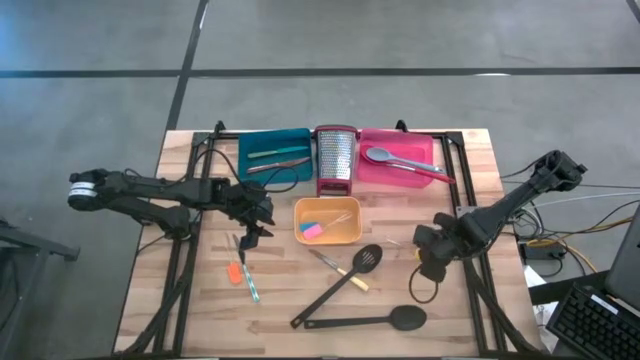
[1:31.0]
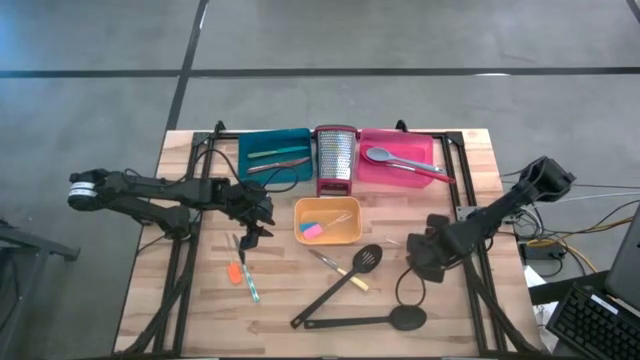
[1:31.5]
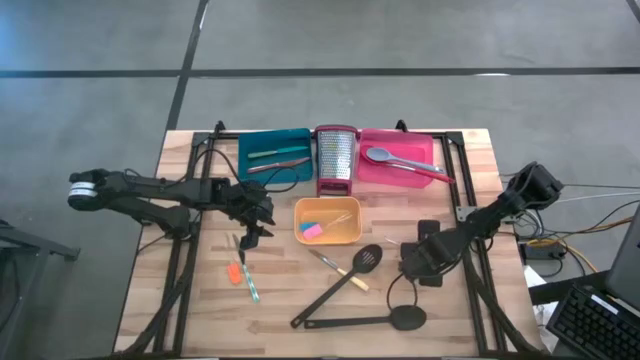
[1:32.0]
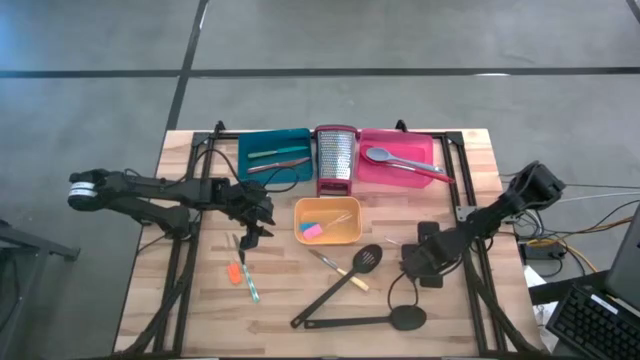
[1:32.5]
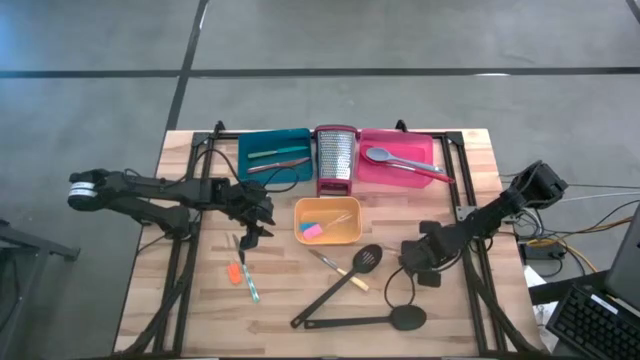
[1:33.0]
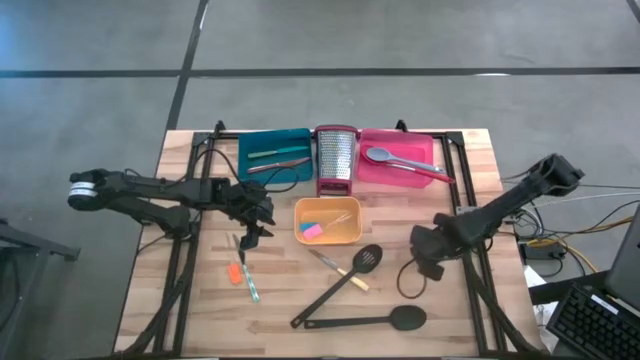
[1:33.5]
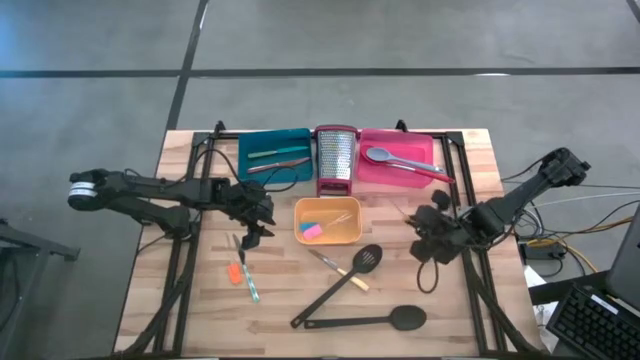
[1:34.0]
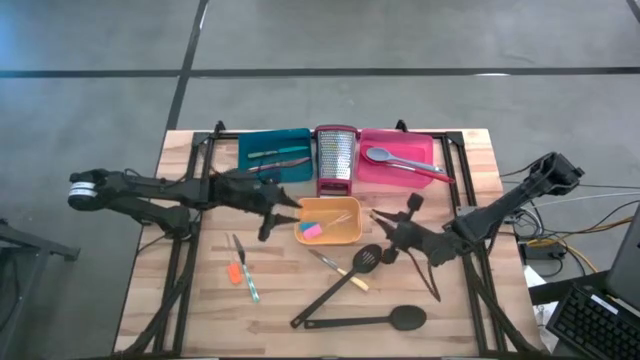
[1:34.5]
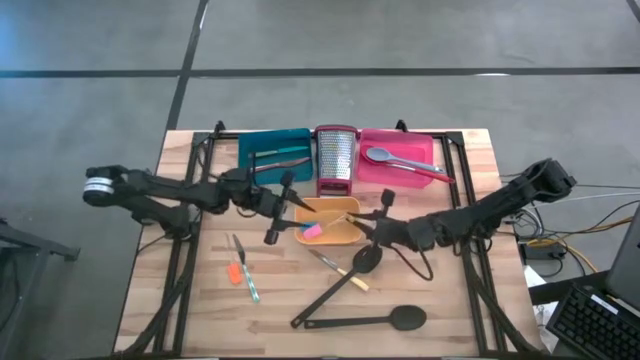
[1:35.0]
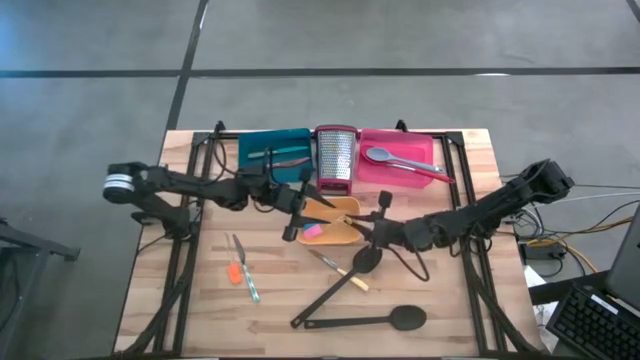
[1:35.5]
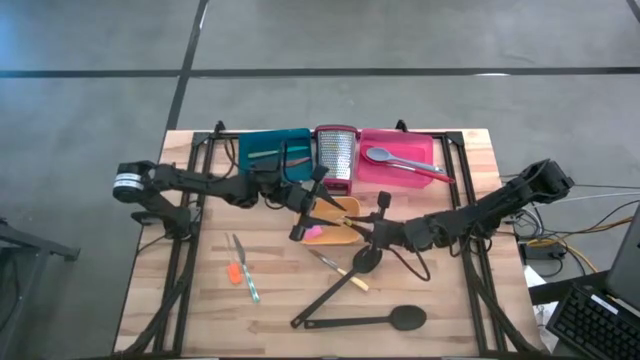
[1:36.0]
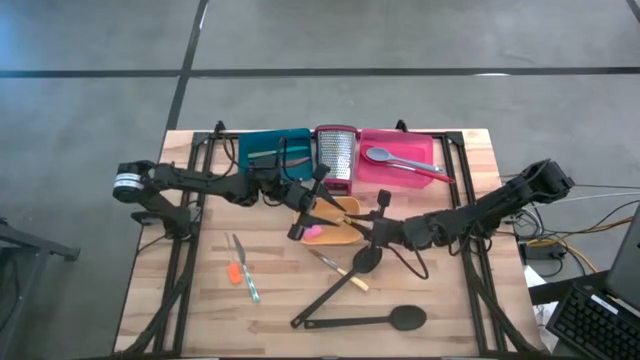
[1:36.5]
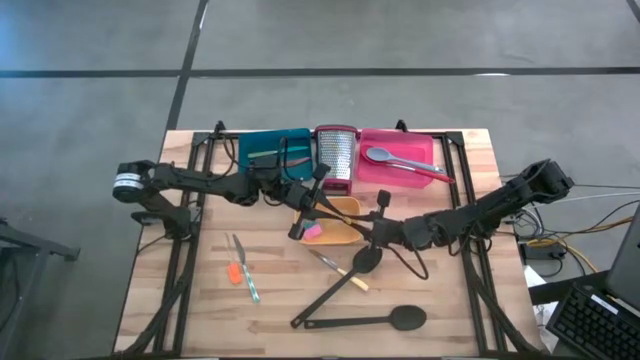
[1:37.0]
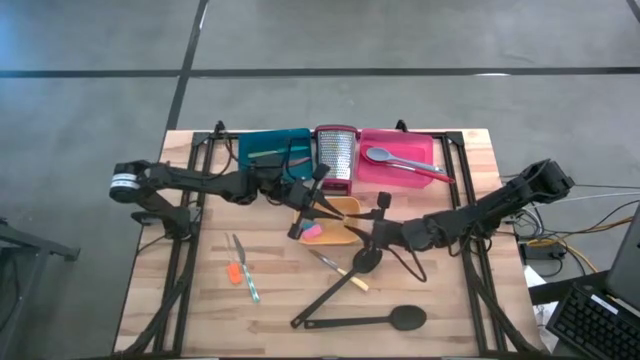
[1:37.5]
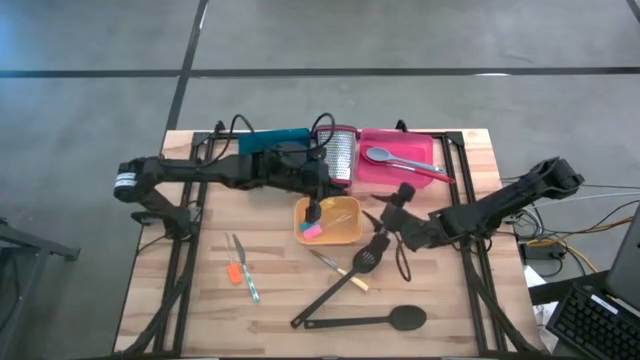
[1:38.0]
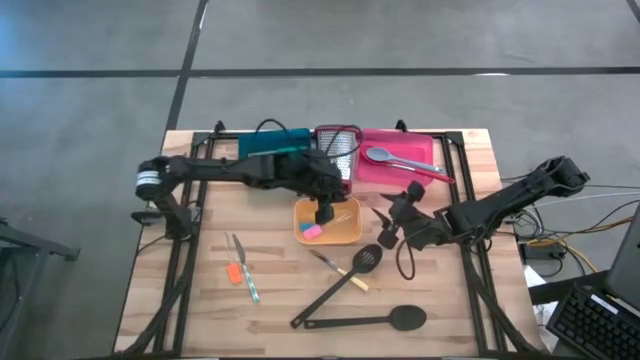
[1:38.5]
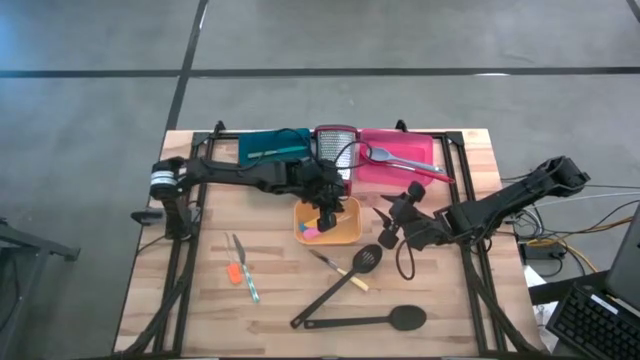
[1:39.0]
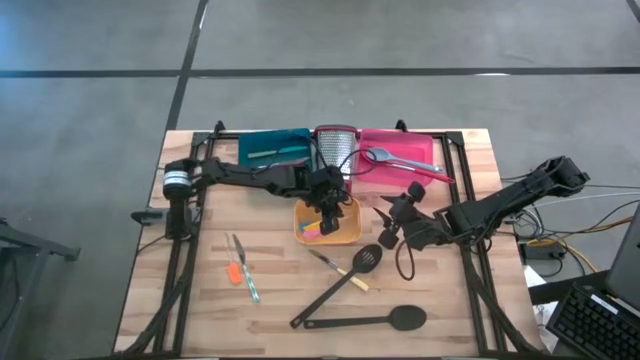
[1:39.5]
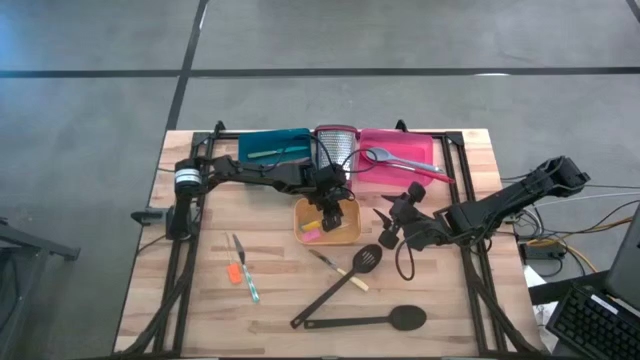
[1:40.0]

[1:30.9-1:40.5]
Task: Pick & Place Kitchen Items
Put the yellow spatula into the yellow bin

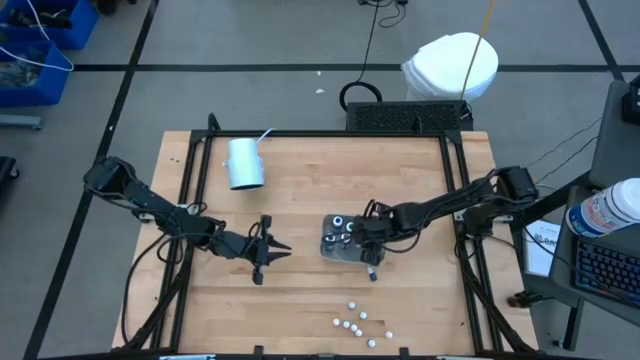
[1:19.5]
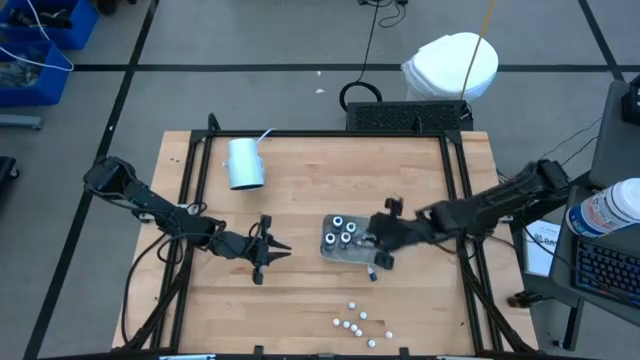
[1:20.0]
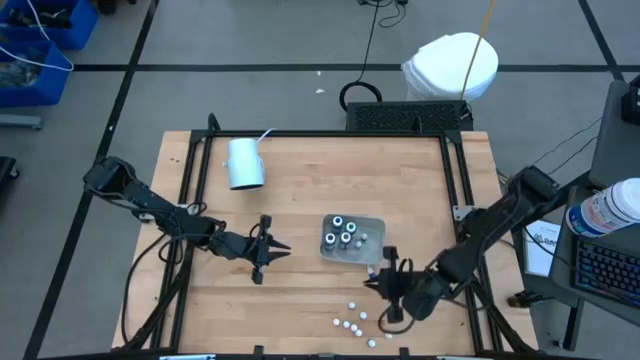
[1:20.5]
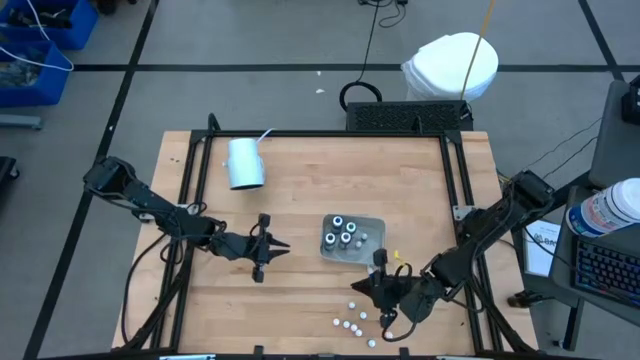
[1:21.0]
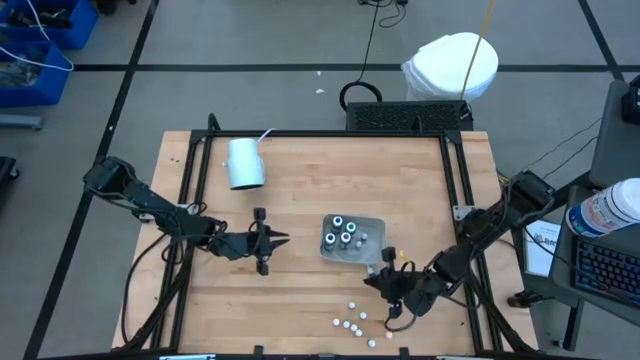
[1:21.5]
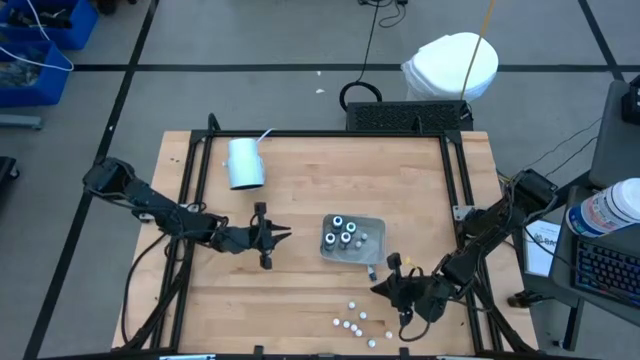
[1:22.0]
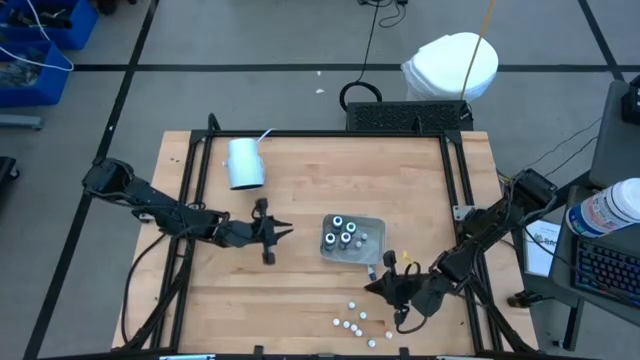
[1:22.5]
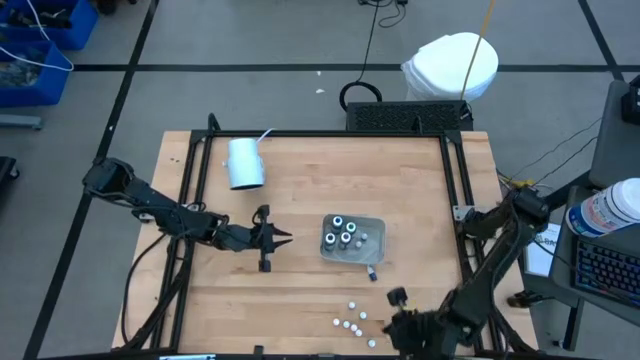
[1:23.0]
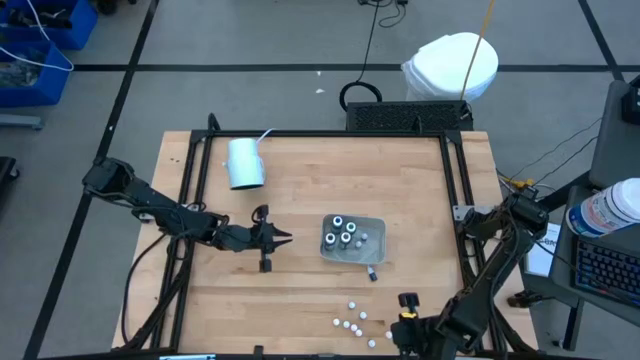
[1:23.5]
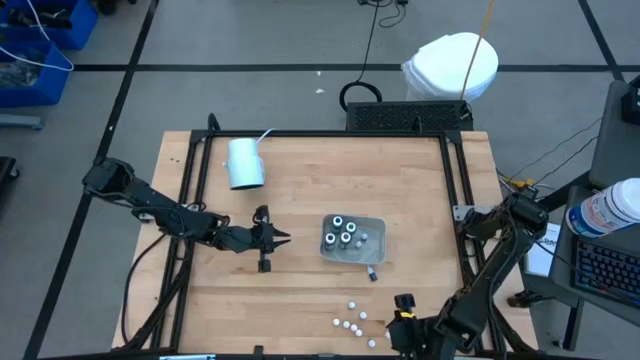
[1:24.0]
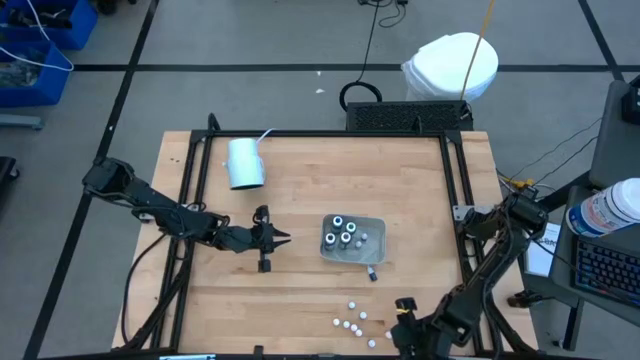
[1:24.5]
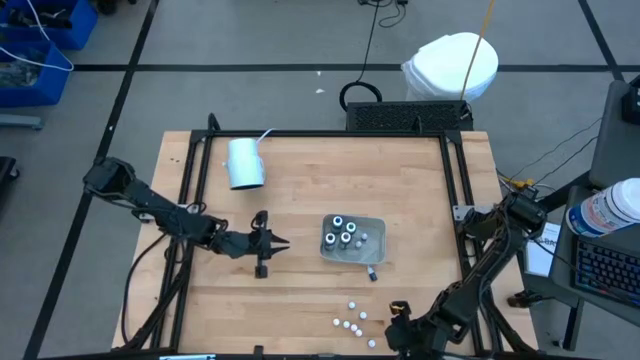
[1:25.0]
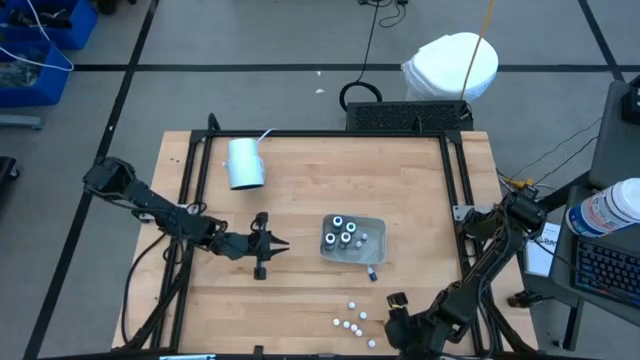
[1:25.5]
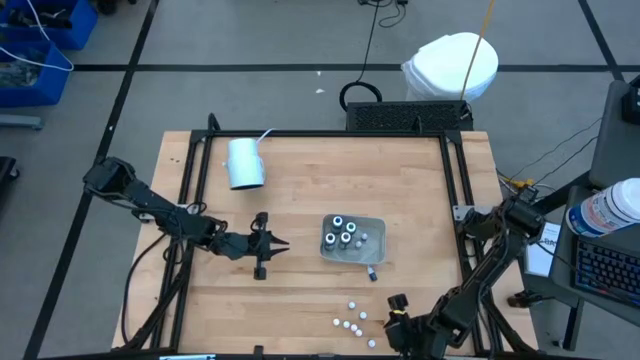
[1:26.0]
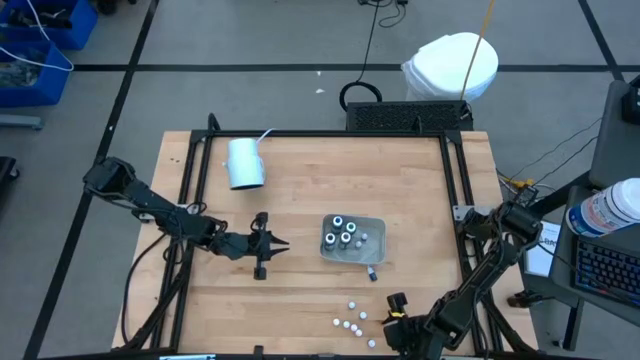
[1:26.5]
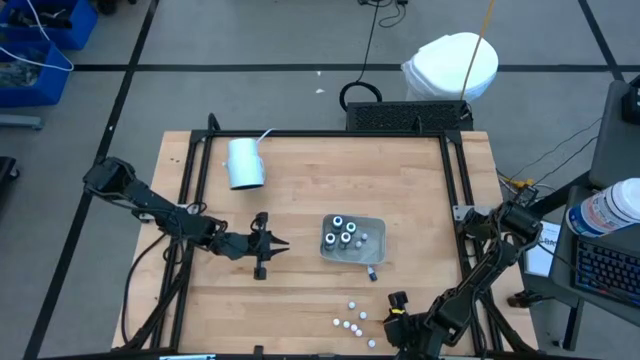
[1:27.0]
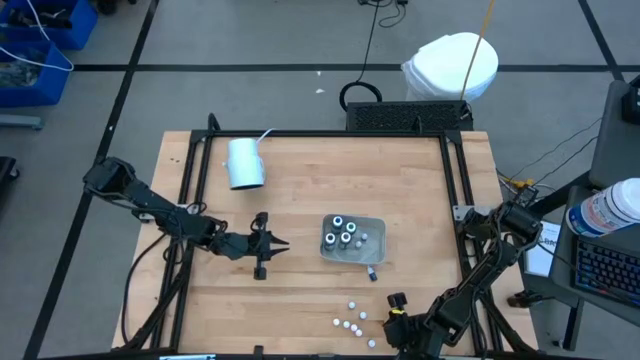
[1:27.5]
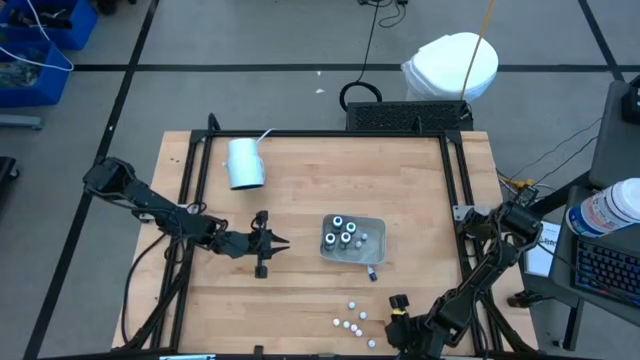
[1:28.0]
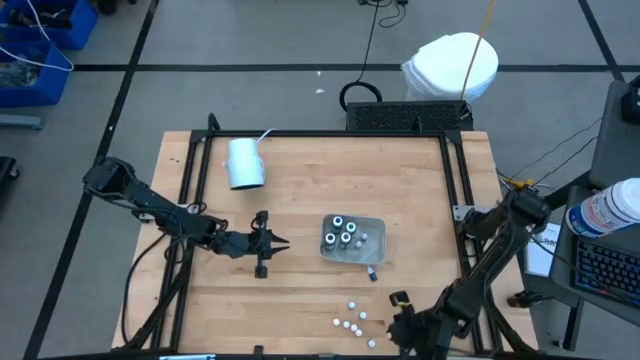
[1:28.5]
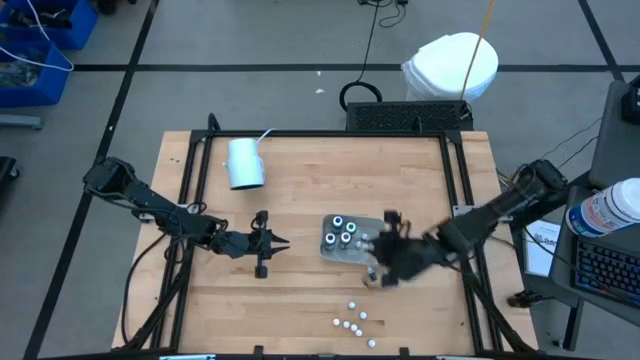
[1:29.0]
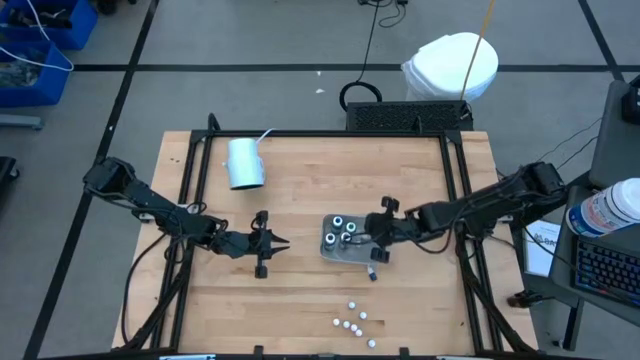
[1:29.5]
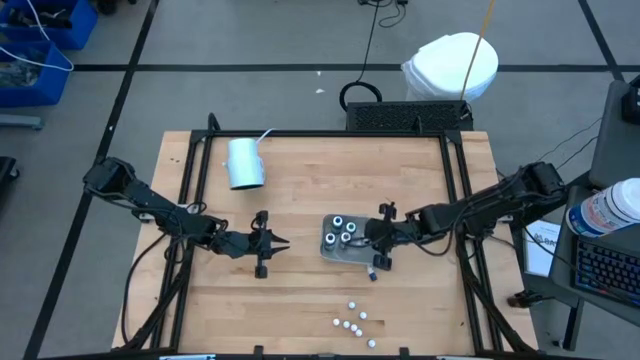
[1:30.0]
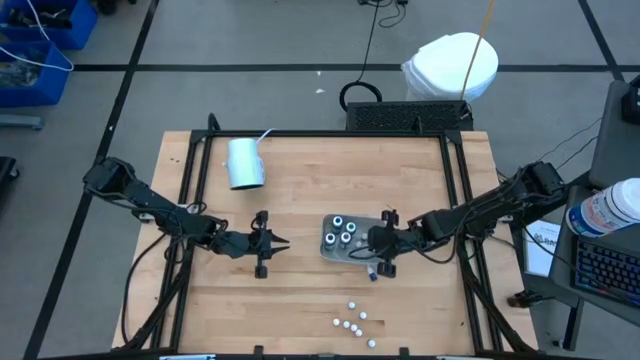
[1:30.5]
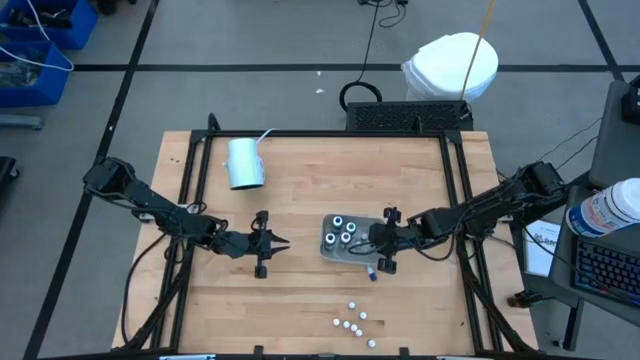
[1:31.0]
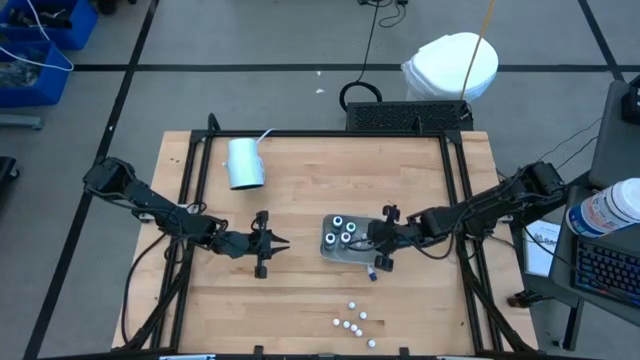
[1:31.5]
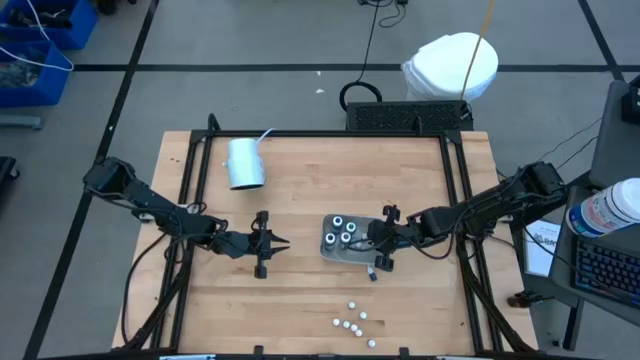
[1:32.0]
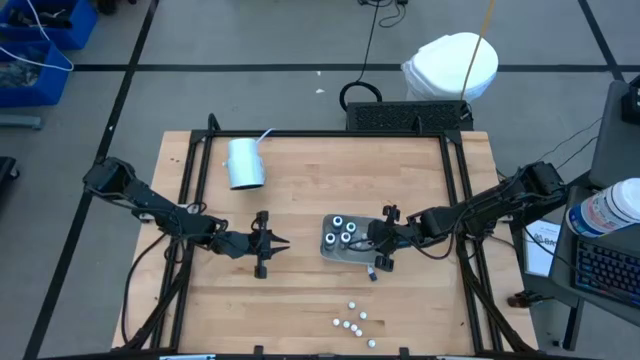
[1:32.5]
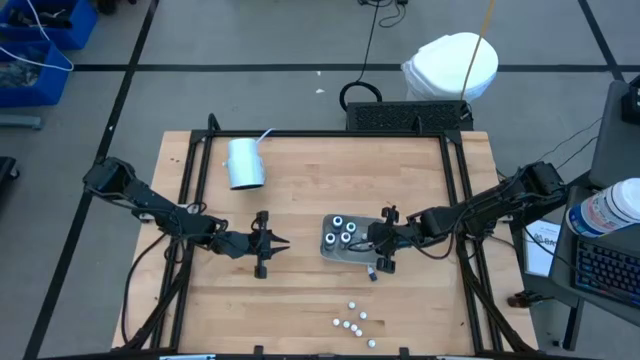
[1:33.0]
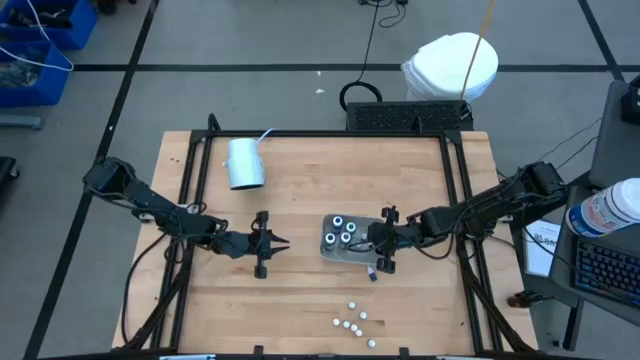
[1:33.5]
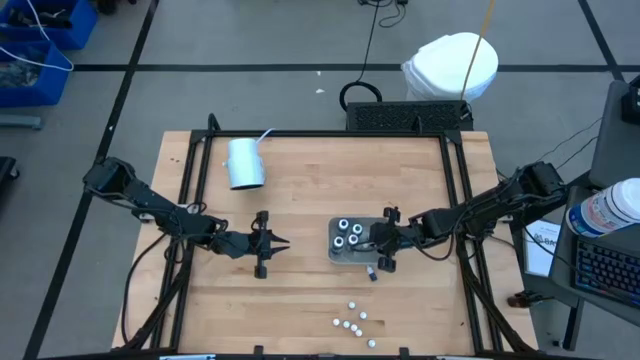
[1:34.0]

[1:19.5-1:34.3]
Task: Pick & Place food coloring
Put the orange food coloring bottle into the gray bin
